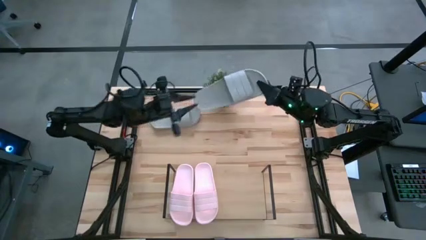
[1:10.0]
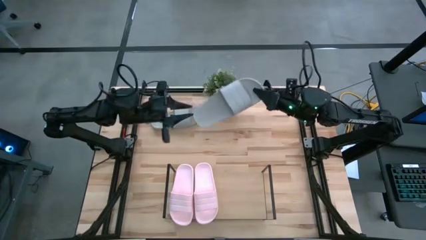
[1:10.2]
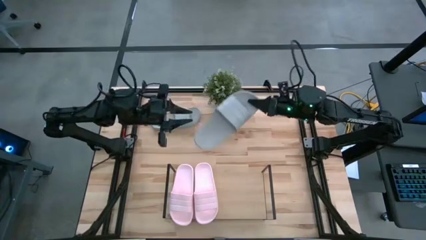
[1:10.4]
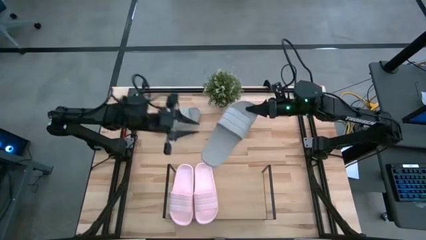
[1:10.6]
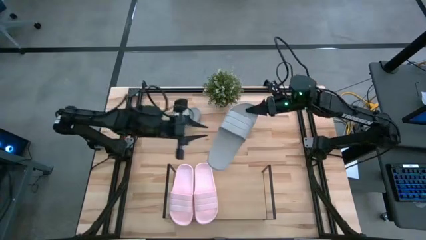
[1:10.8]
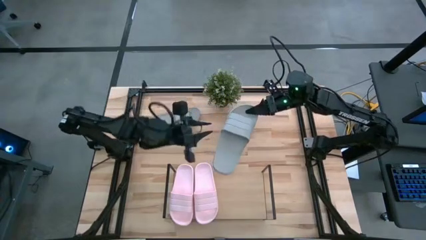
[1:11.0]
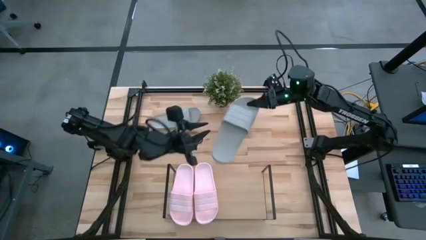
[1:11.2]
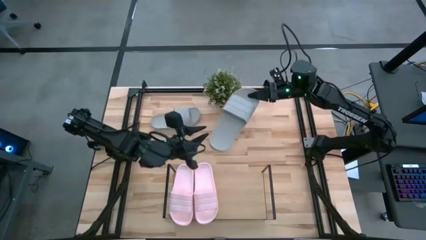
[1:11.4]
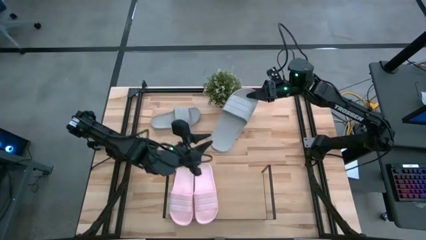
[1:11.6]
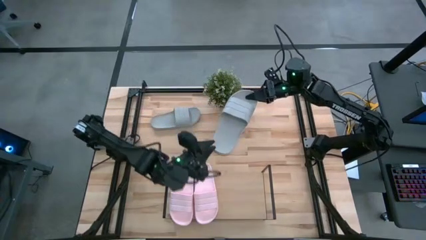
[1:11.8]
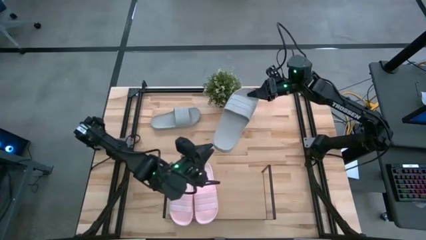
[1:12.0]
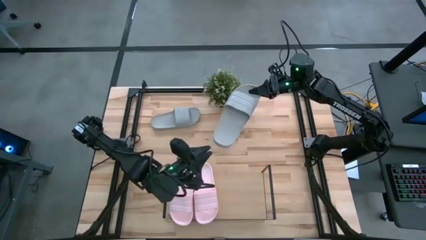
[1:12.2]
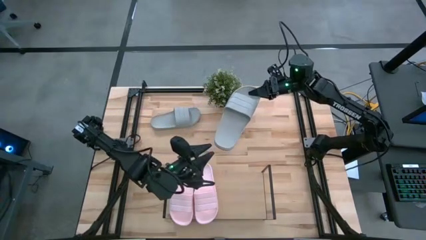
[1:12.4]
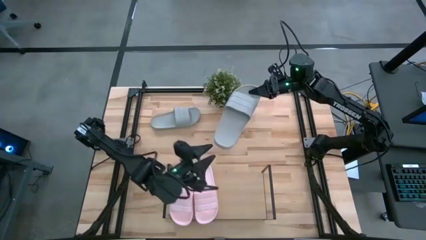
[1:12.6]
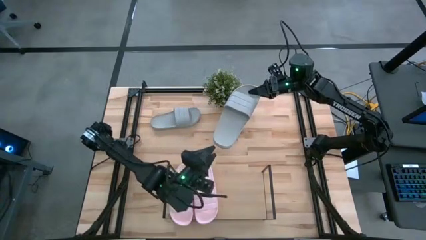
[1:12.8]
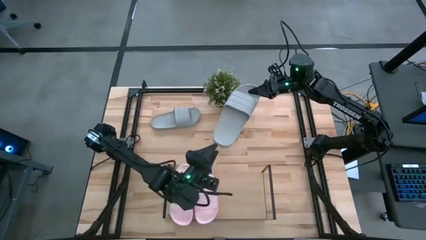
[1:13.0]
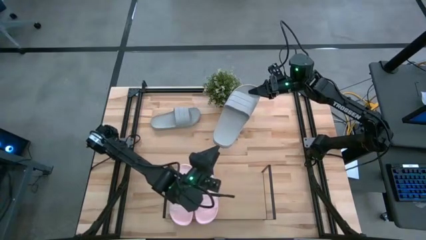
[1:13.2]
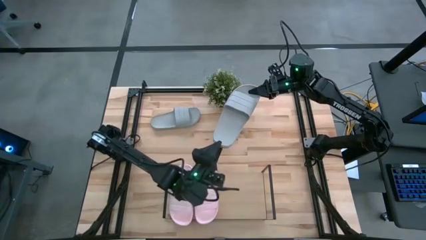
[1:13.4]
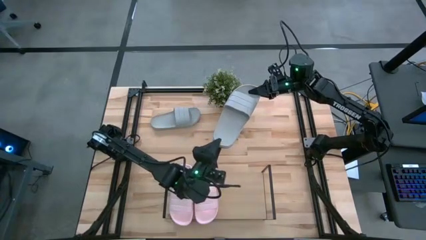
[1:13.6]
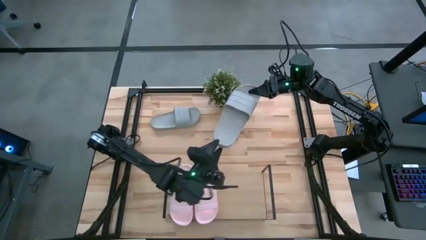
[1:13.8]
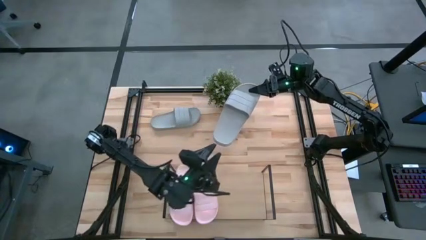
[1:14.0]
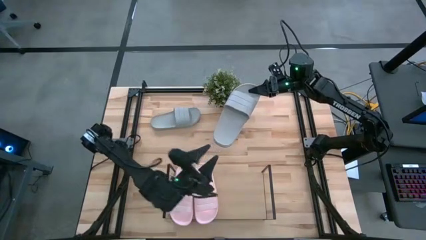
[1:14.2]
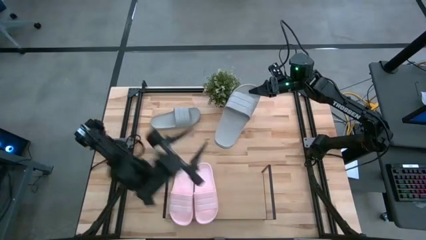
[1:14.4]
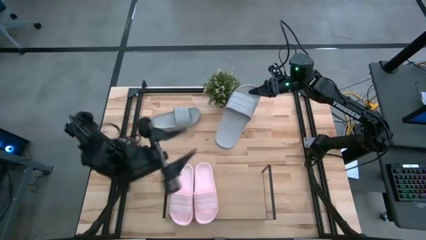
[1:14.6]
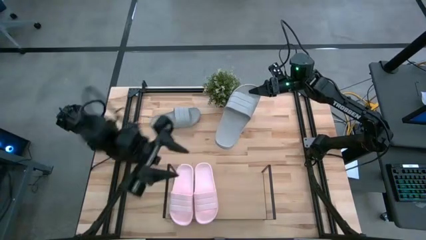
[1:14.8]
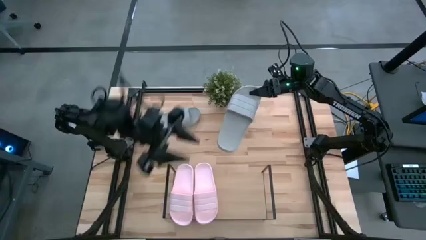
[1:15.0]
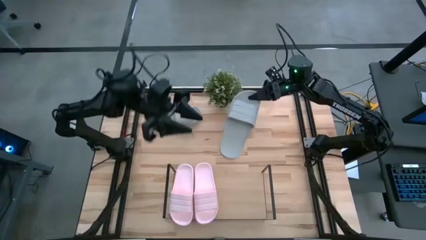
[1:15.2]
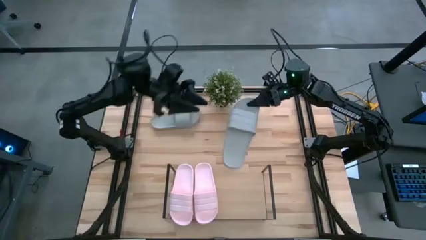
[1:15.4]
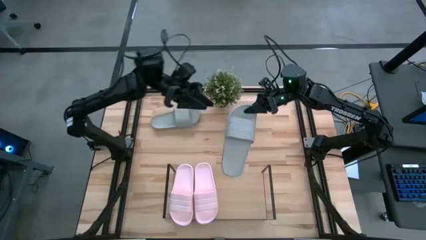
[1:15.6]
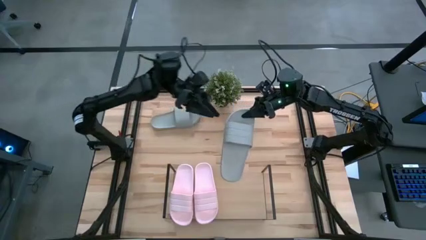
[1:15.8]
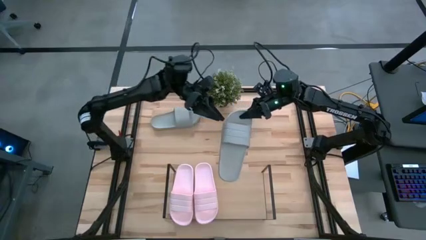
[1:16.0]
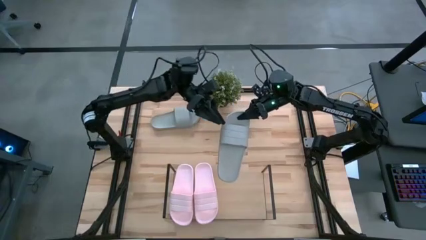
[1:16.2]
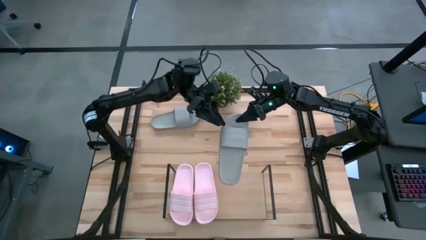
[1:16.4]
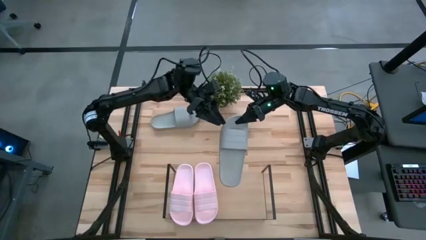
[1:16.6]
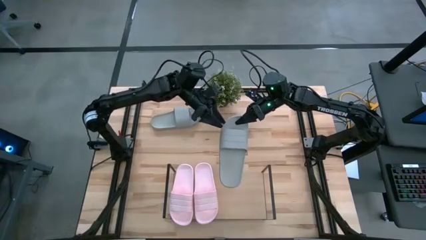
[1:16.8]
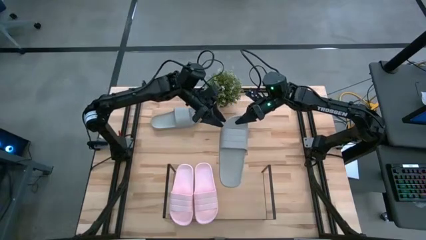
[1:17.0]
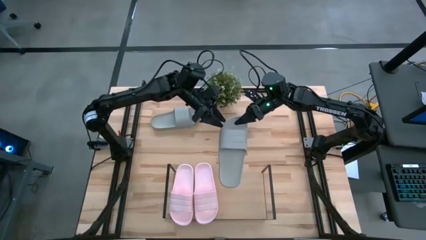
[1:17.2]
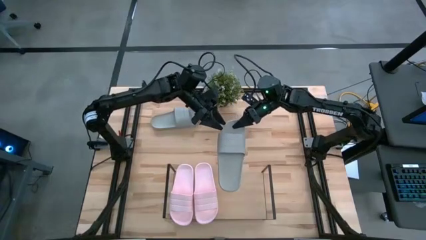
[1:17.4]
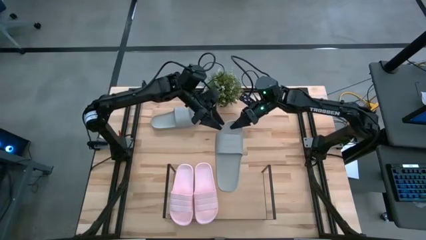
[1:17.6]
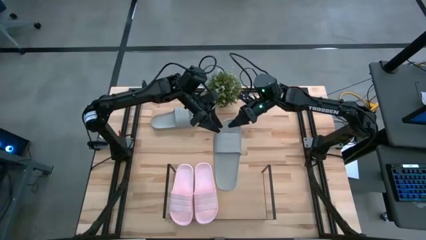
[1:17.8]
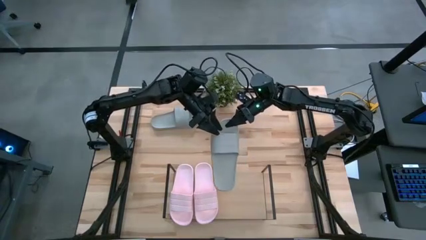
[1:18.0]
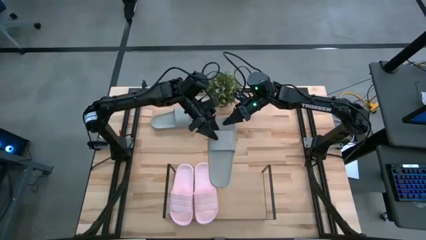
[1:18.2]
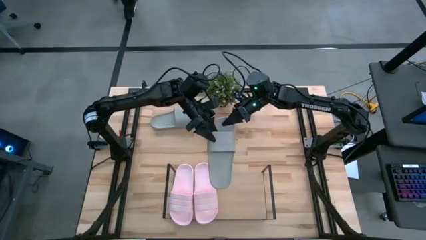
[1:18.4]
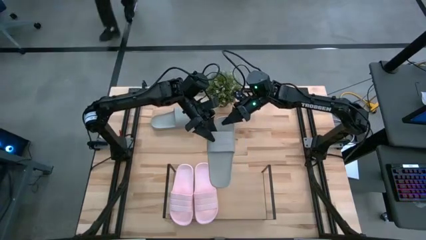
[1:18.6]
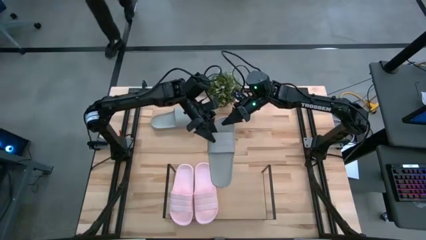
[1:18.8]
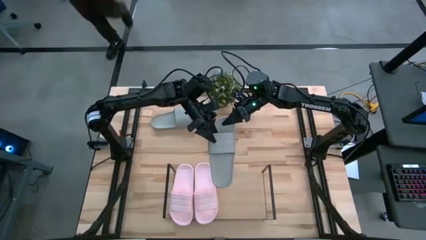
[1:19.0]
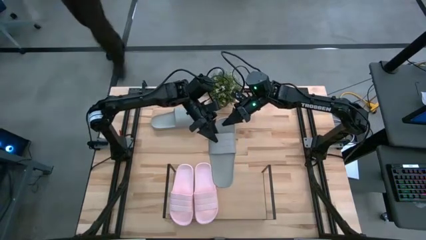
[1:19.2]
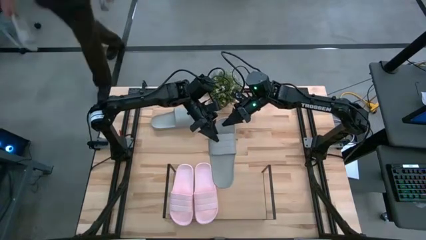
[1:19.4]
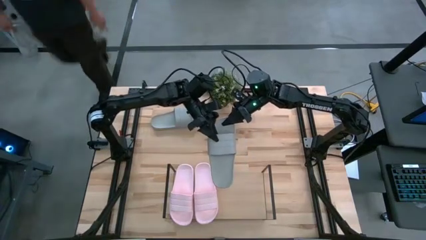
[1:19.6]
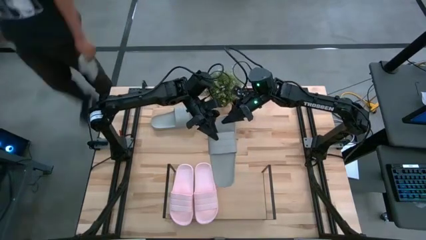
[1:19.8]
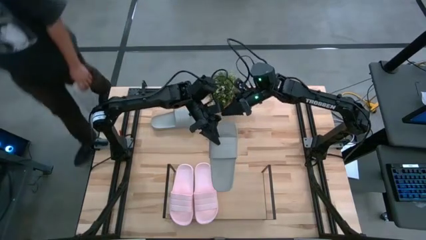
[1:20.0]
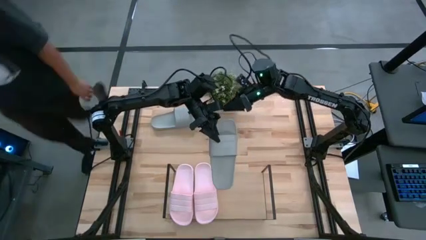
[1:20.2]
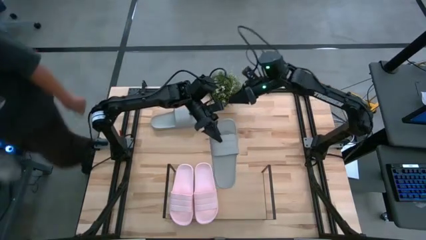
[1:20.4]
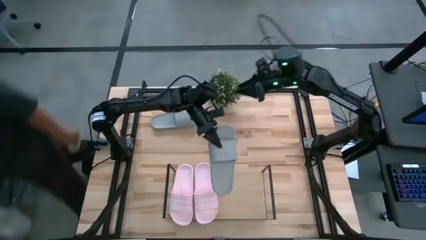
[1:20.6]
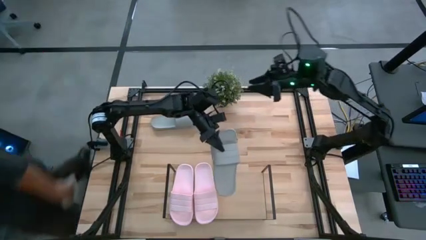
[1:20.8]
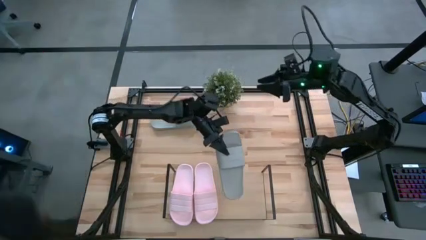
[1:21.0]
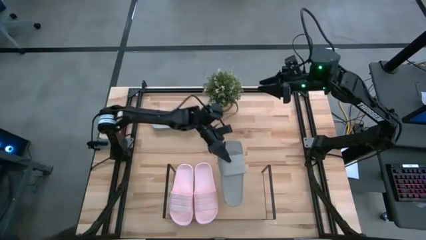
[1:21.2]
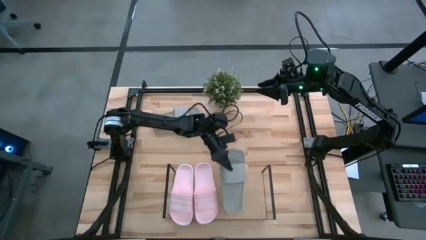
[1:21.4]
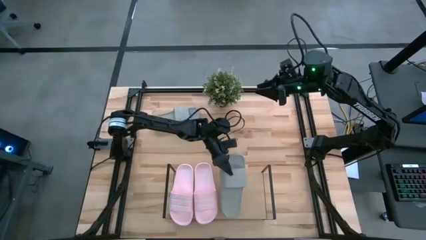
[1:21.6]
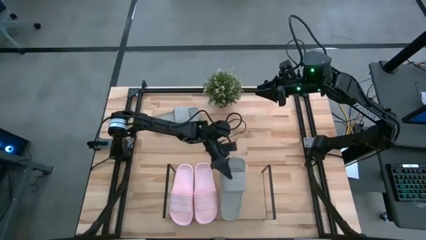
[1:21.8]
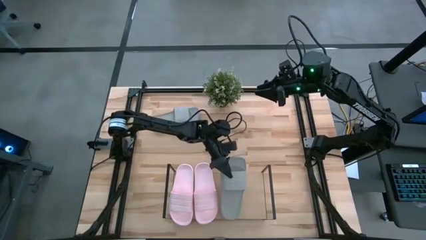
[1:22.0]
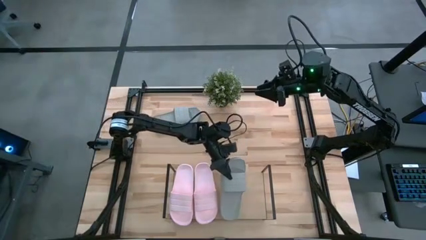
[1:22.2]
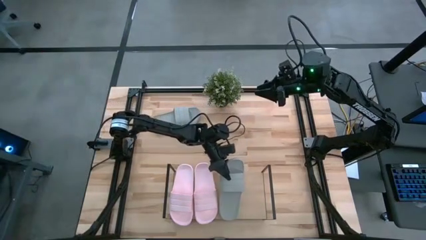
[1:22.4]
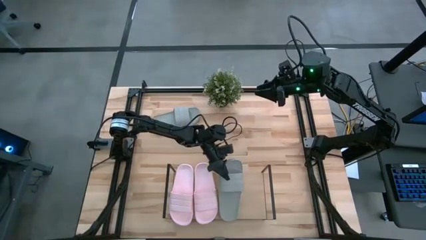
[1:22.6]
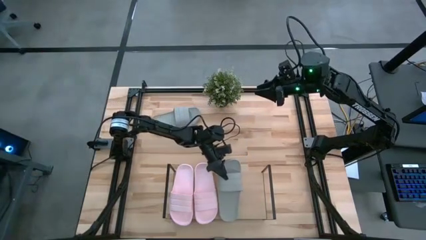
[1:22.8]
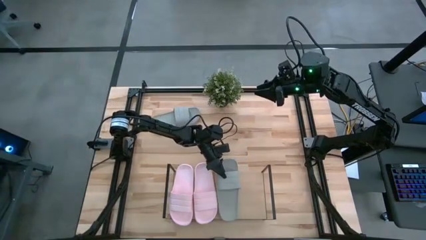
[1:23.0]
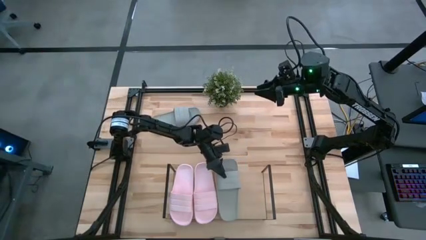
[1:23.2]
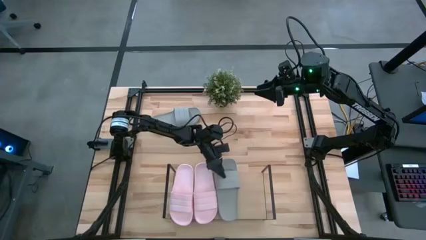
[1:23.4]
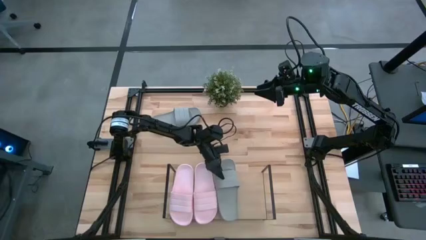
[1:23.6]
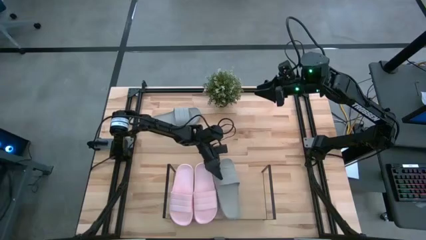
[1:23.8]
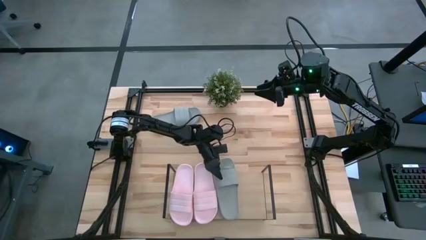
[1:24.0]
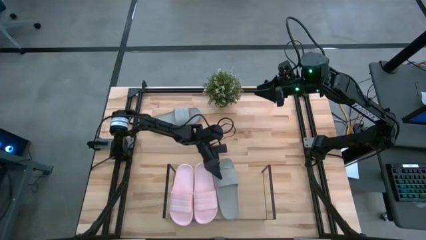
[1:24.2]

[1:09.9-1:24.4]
Task: Pick and place slides into the shelf
Put the top gray slide on the shelf
